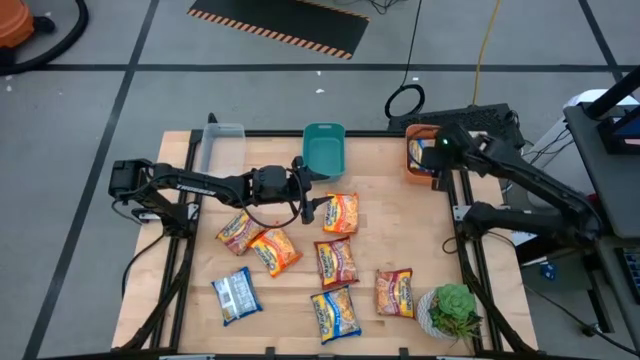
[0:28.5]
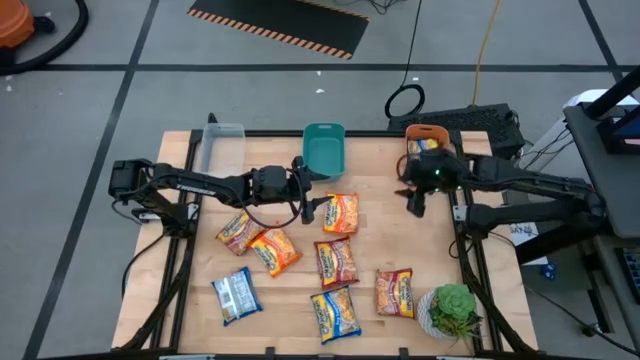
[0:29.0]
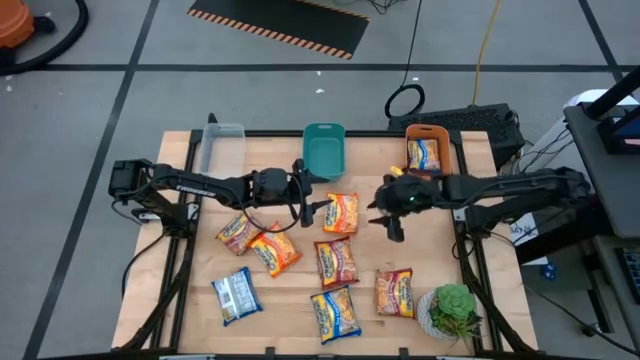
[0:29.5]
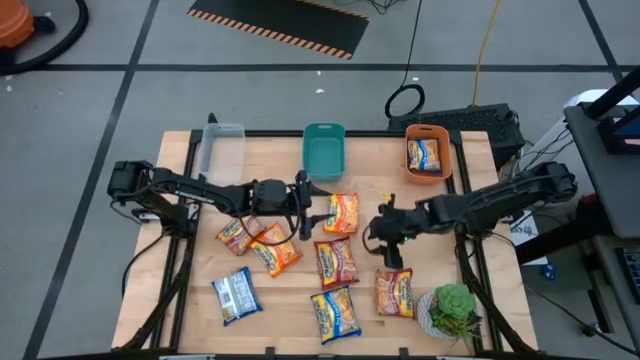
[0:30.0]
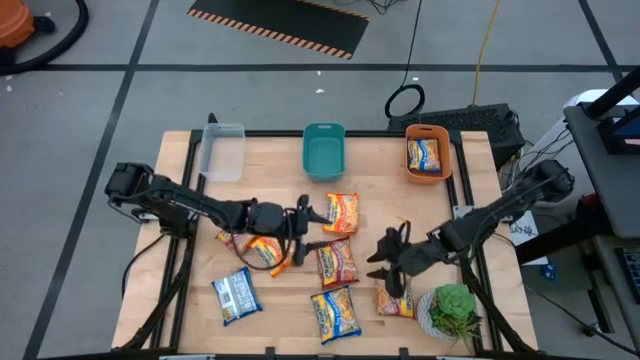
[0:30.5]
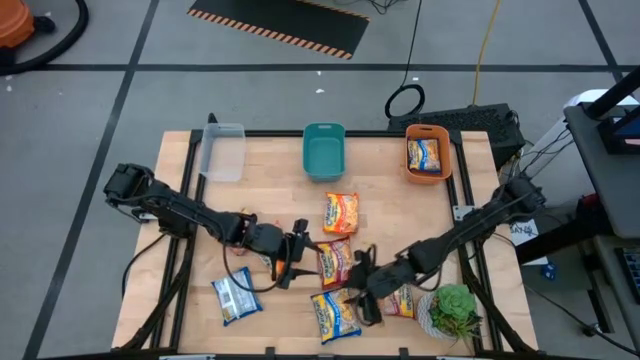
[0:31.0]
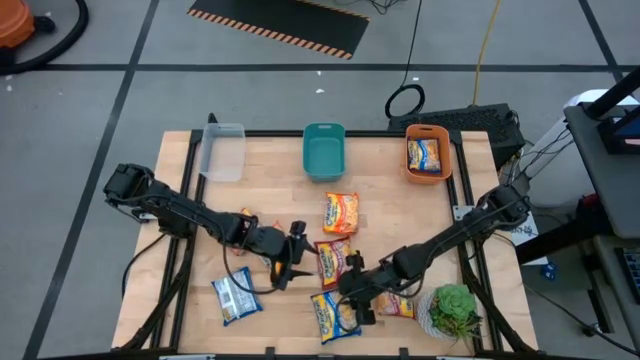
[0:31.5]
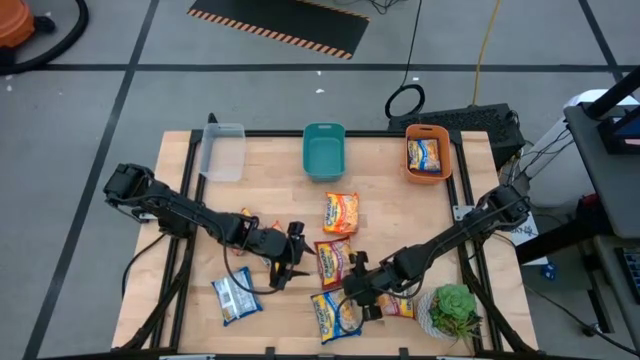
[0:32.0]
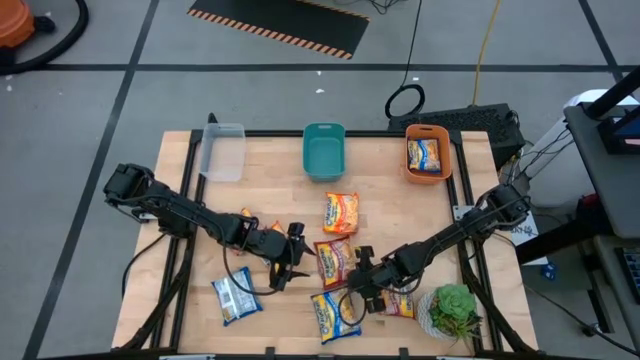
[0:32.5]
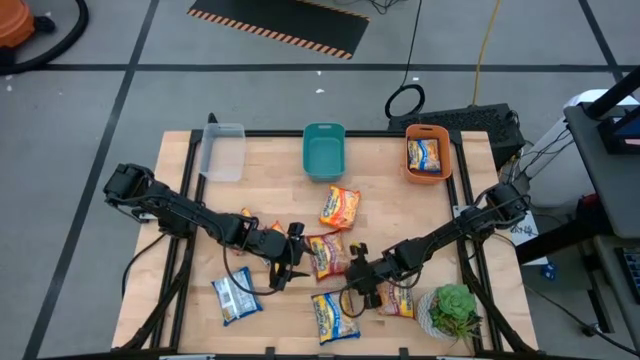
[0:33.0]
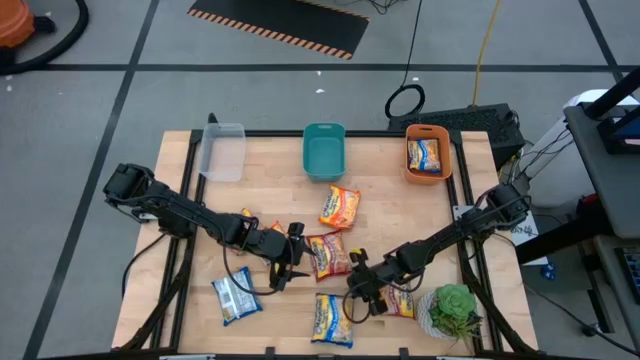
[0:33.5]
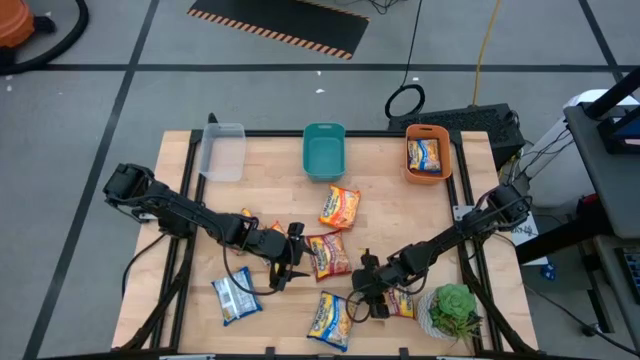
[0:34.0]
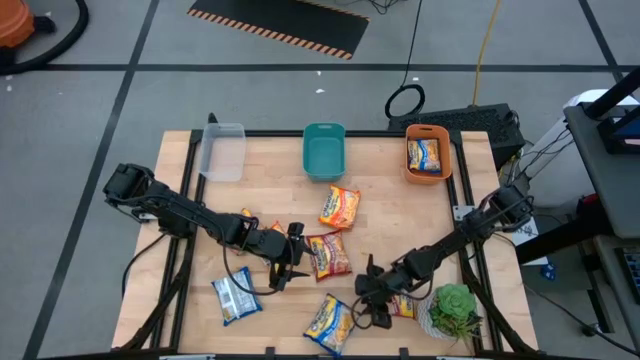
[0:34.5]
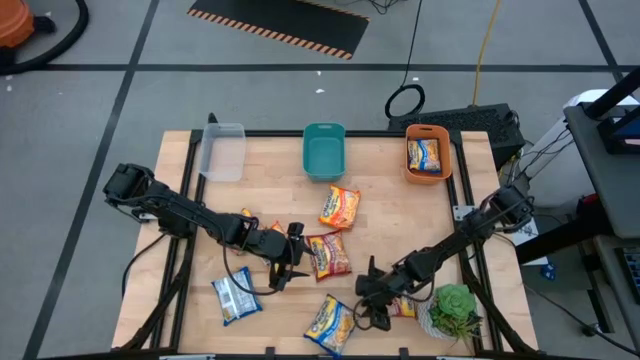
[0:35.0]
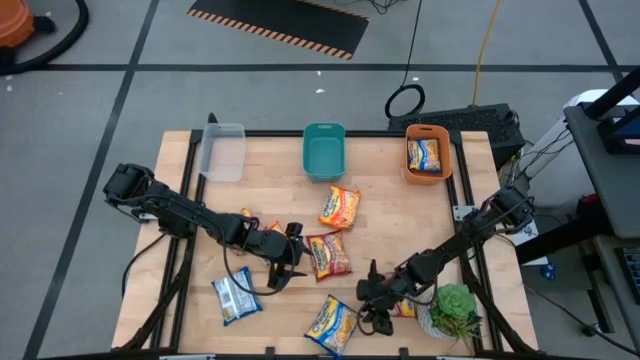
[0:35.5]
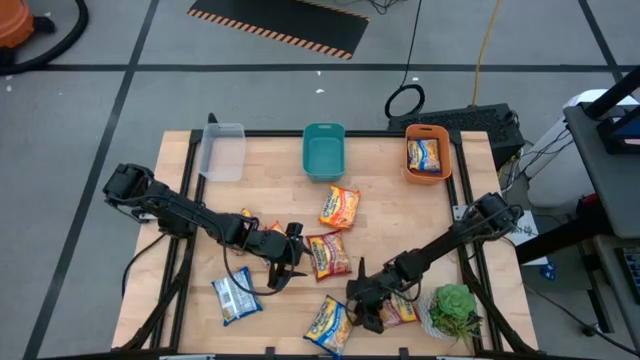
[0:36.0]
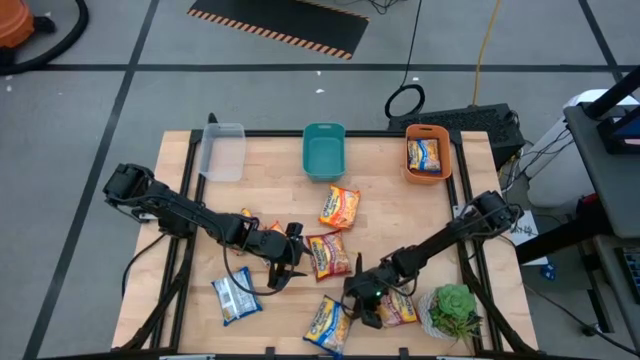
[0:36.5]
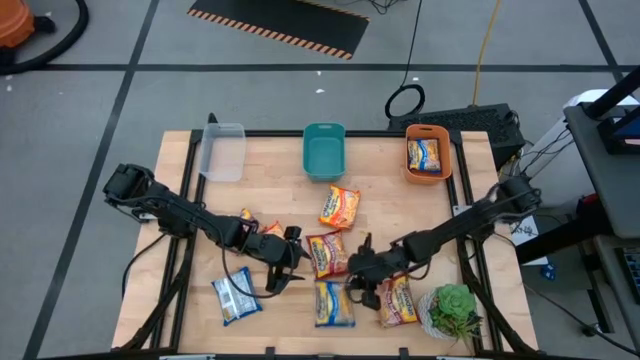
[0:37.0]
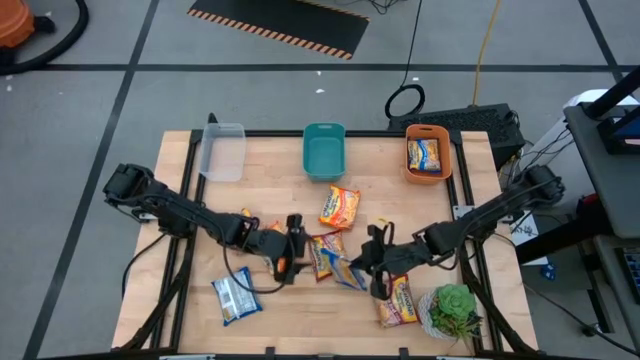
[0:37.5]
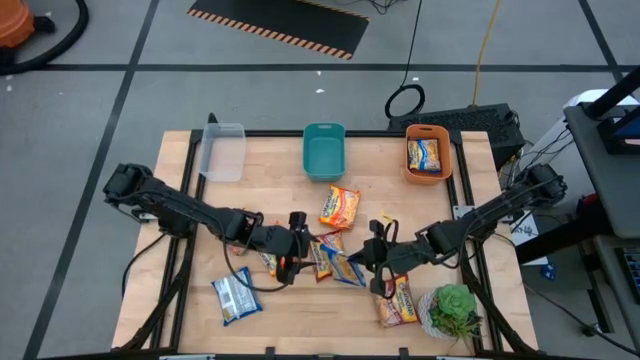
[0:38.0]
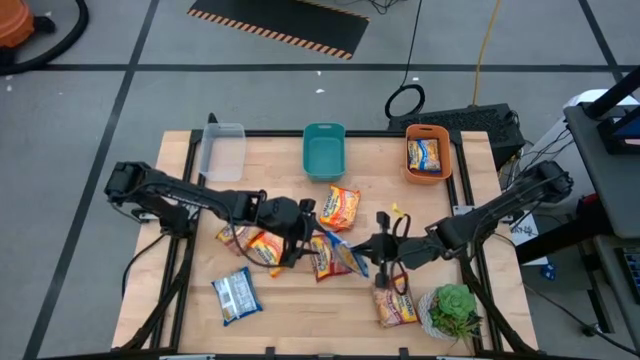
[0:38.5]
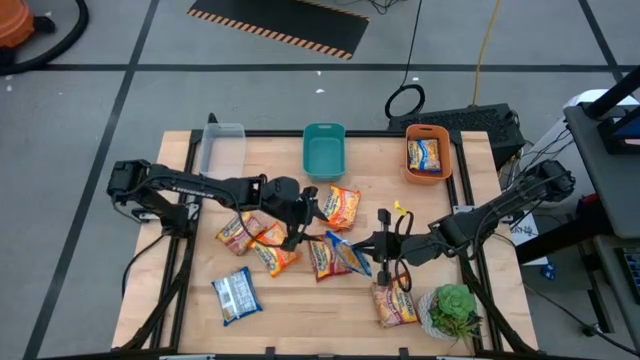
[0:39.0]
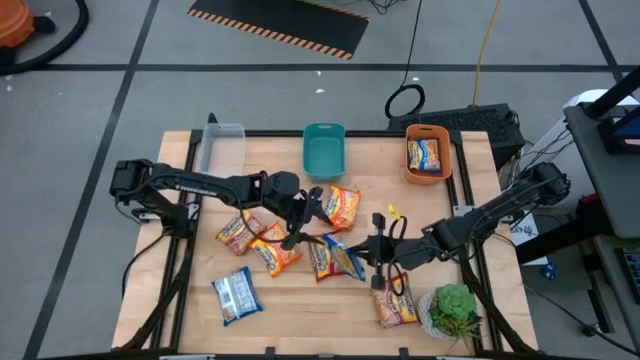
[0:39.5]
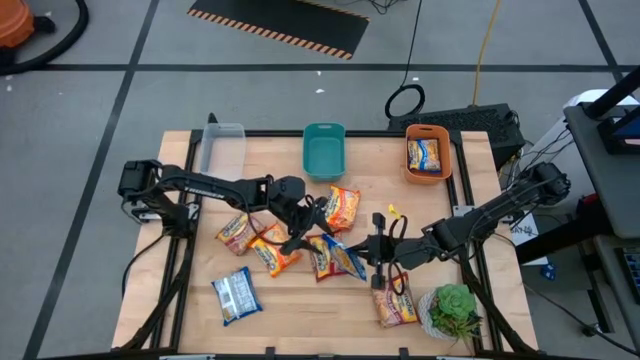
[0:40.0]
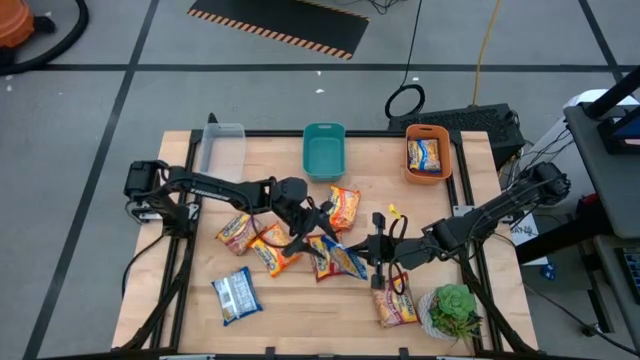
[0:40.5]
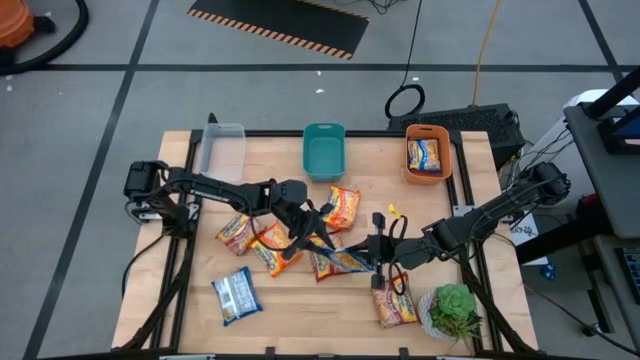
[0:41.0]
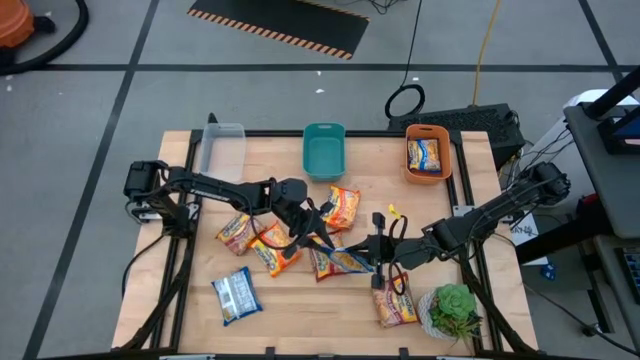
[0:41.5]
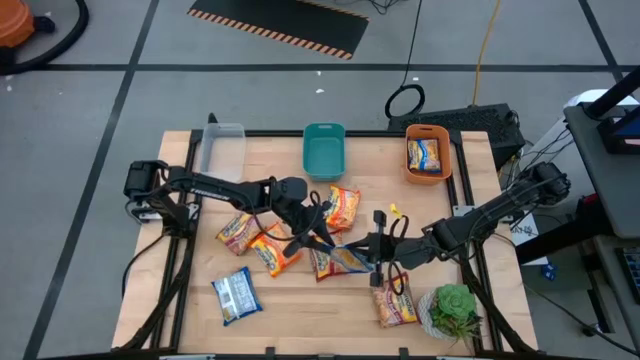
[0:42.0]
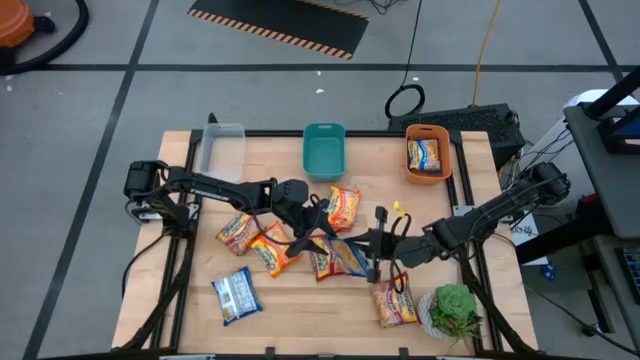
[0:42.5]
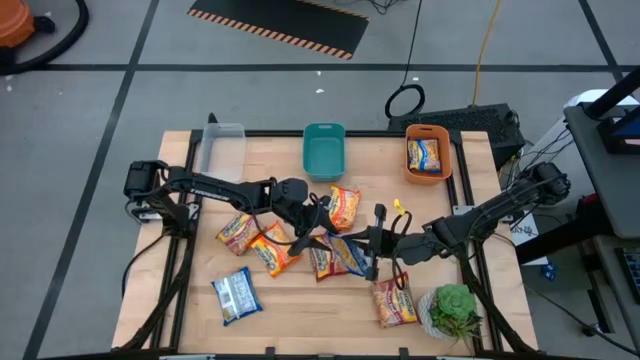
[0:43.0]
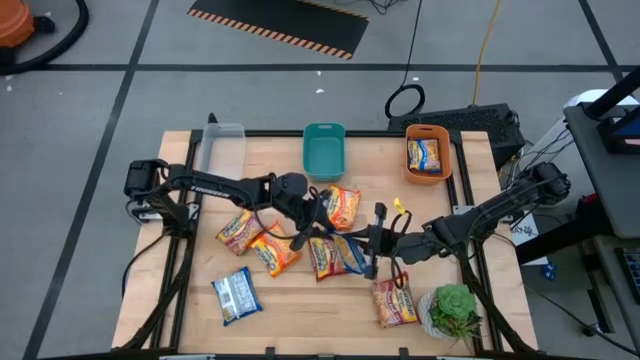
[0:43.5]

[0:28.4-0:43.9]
Task: Sort Maruchan noodles
Put the right blue noodle pack into the orange bin

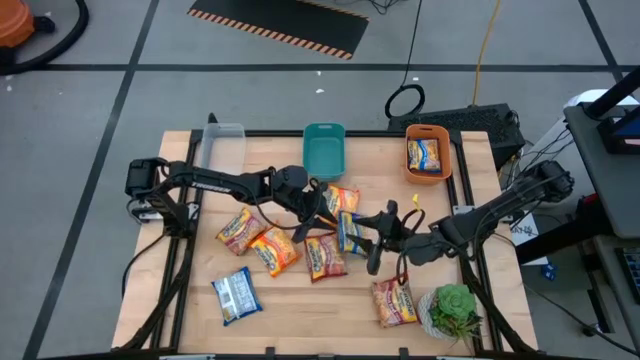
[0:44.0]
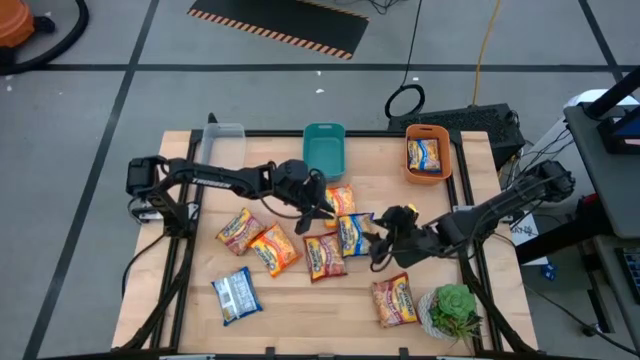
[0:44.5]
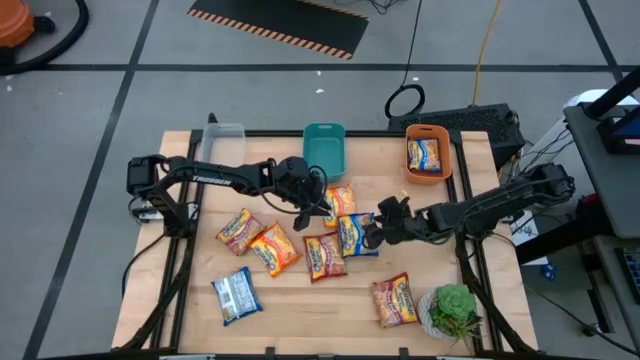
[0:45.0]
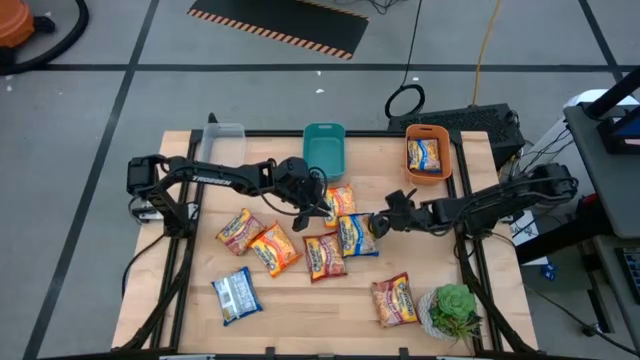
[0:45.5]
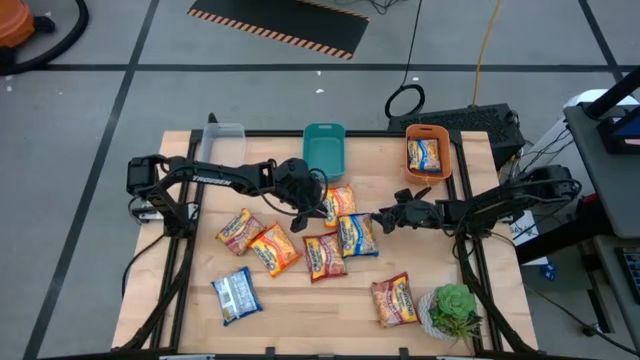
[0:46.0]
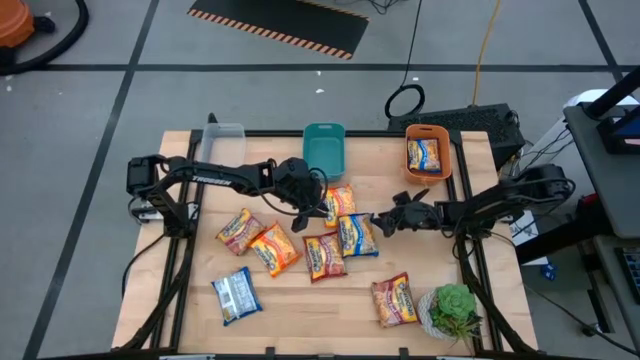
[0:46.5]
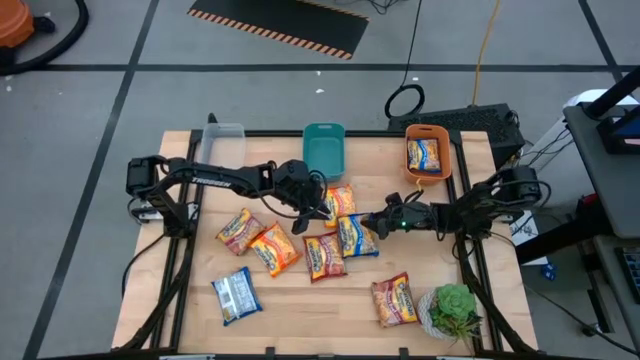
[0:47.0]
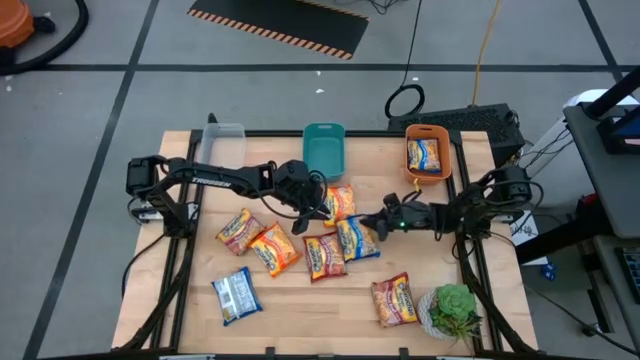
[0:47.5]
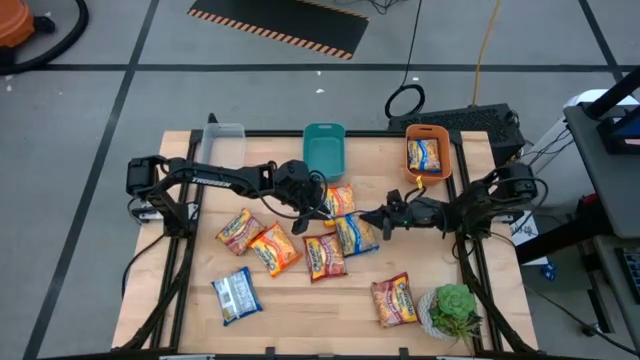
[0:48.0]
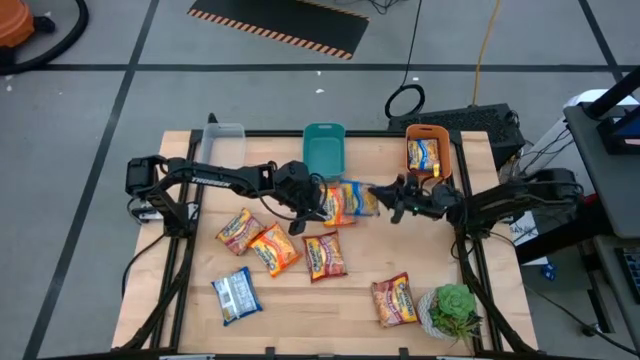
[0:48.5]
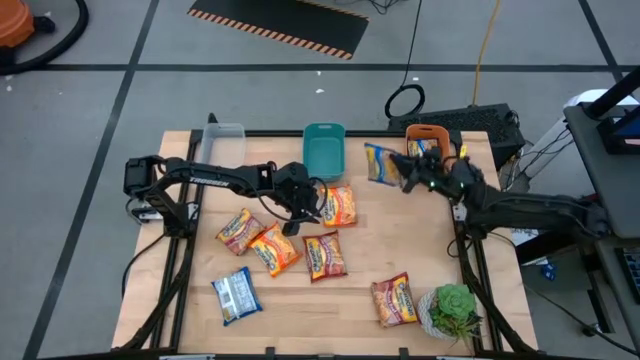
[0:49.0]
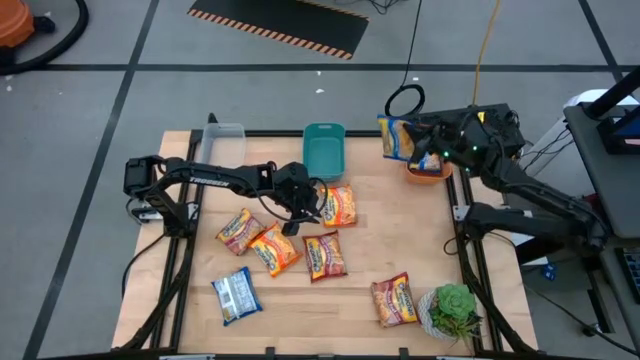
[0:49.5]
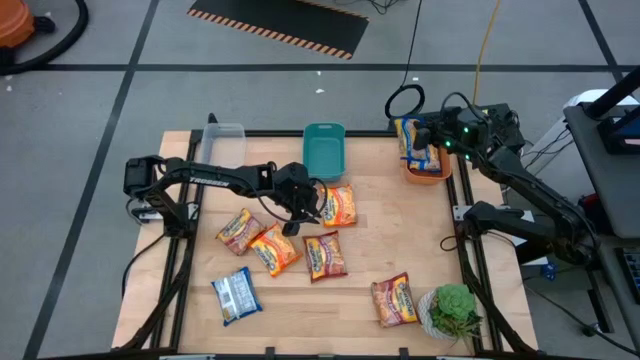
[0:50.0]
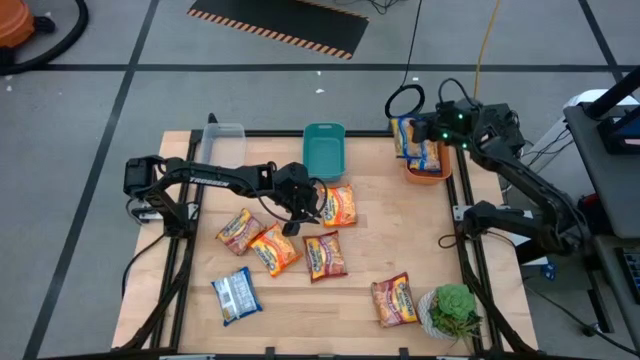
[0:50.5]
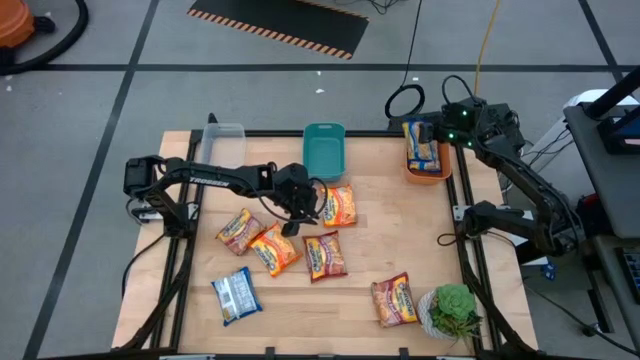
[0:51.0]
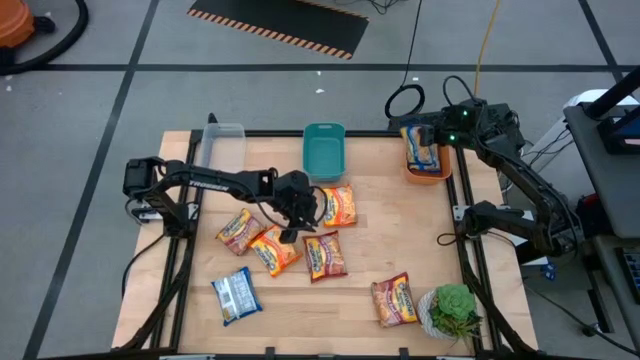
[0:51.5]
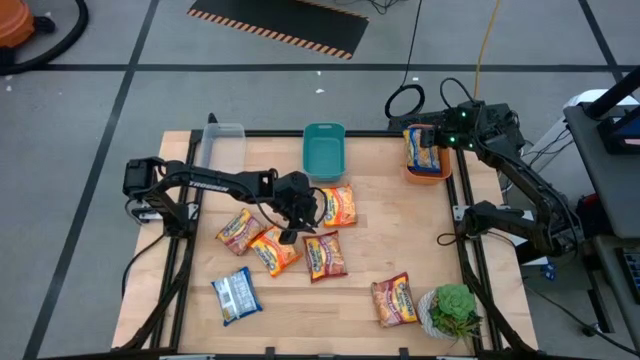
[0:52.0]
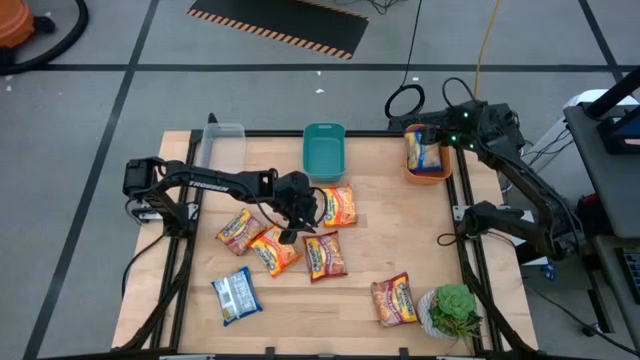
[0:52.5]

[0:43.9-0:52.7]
Put the right blue noodle pack into the orange bin
